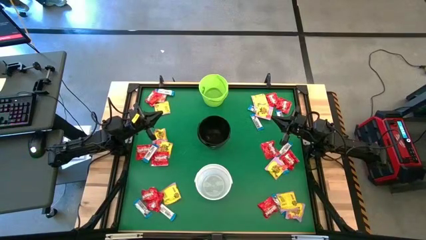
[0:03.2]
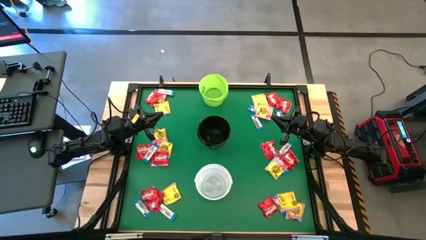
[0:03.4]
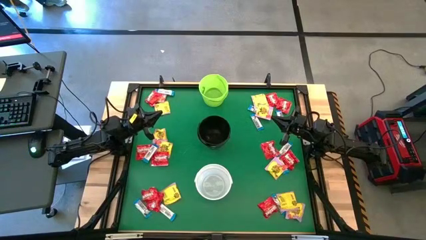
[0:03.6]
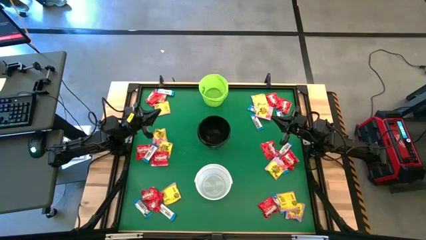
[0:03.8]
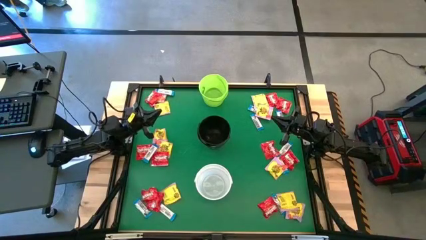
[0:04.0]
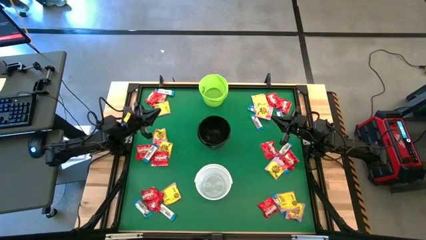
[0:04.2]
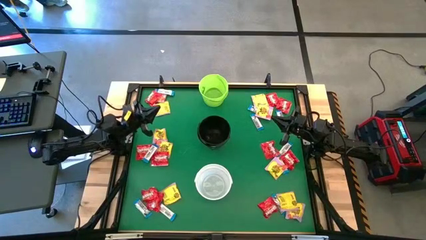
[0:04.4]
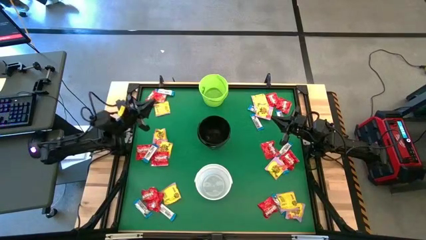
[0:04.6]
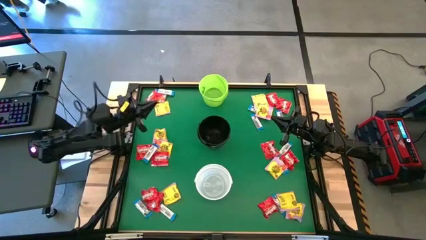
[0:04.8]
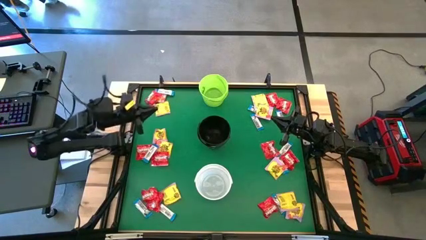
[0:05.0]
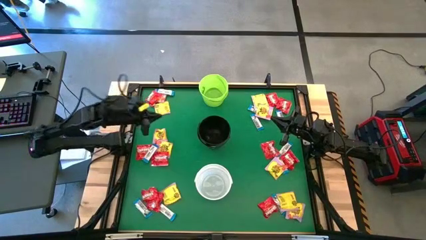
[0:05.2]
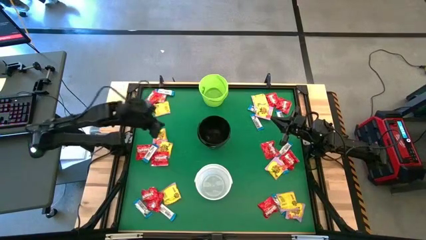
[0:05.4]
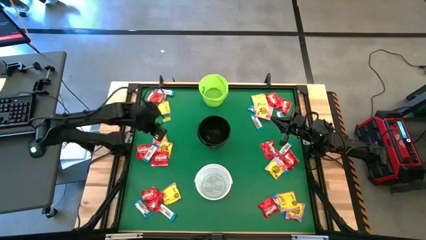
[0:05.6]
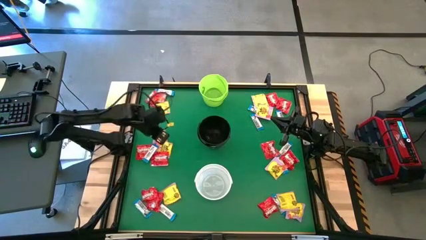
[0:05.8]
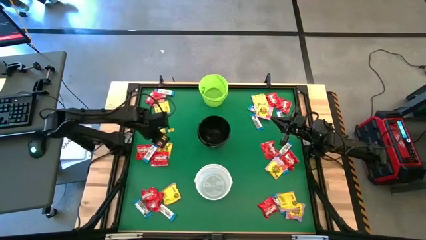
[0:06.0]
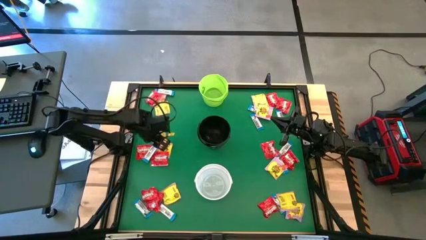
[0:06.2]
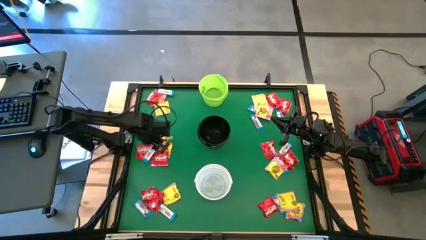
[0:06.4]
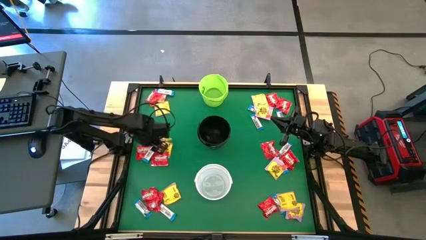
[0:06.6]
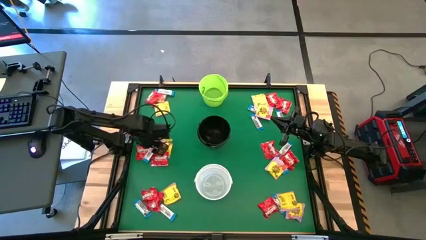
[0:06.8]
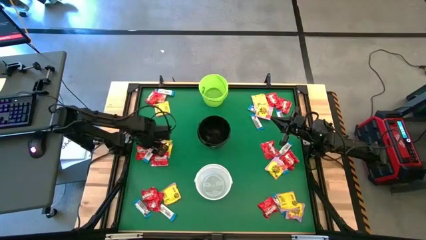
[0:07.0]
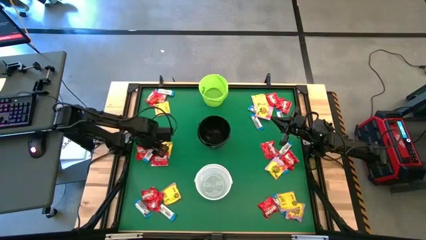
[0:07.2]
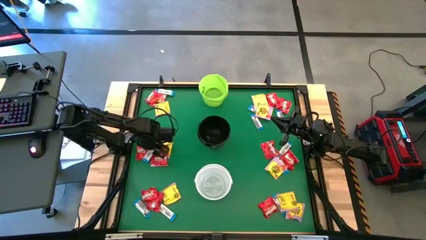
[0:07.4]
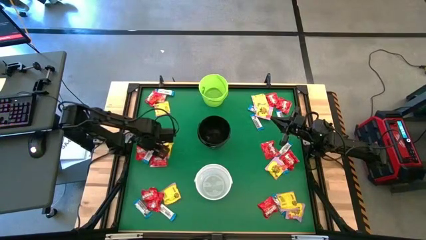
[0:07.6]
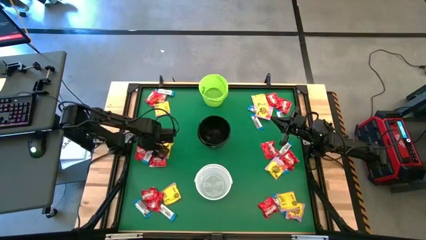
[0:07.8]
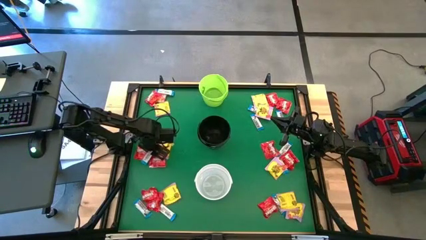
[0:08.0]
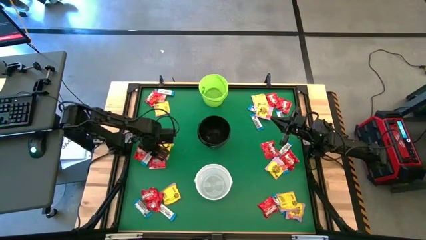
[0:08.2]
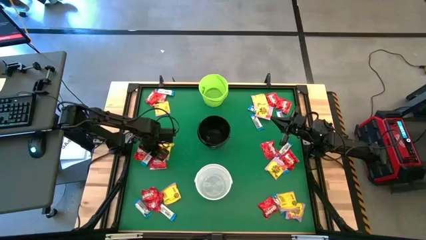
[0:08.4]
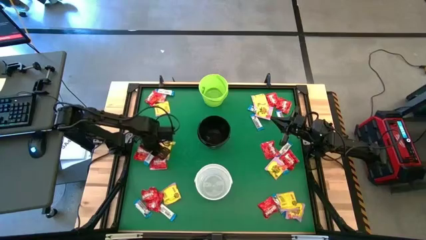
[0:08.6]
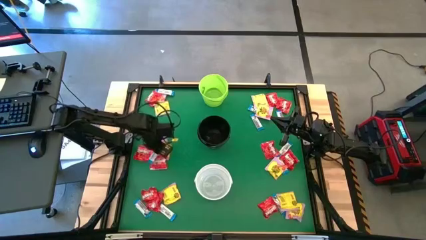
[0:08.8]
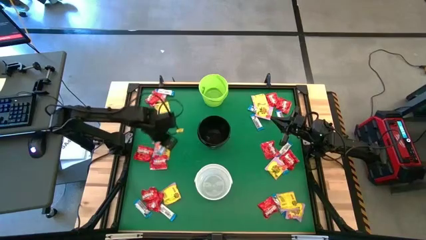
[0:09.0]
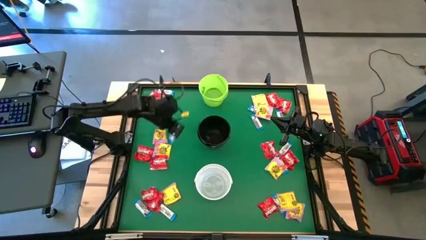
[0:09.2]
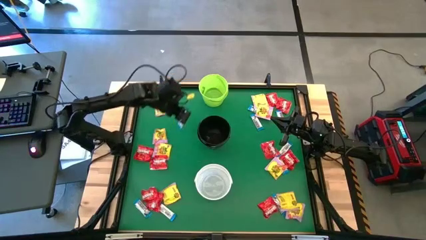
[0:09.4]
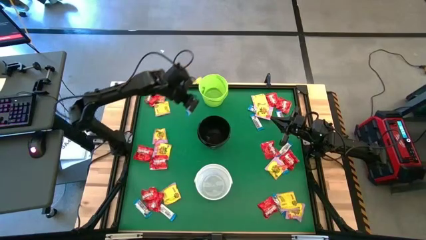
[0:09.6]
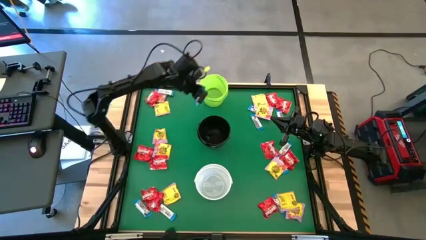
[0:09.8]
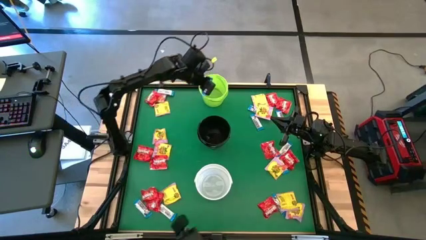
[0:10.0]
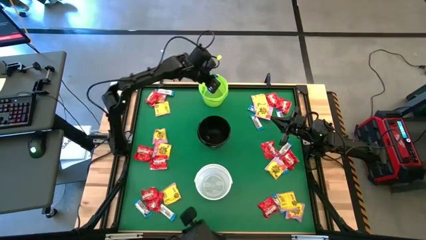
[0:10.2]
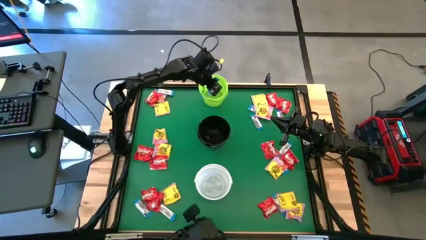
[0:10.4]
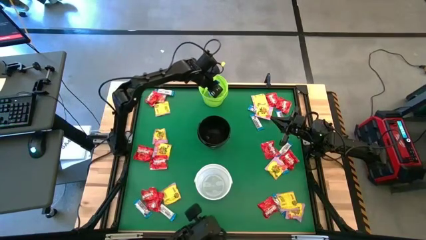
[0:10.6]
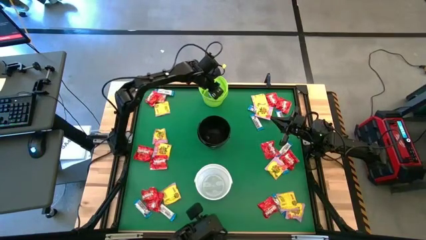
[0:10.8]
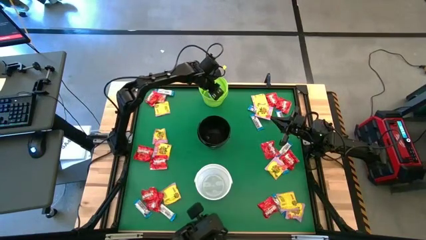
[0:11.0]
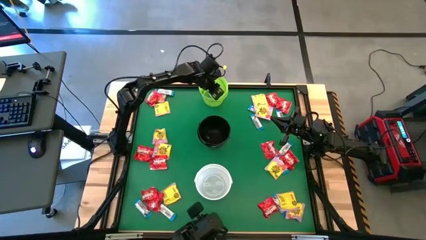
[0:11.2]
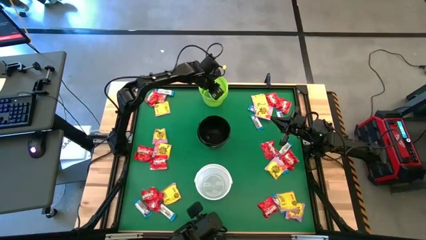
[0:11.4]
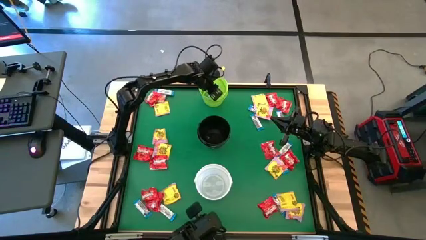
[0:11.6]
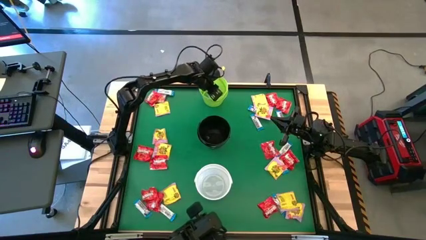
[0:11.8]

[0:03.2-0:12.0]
Task: Sort candy by brand, put in halloween buckets
Put the white chocolate into the green bucket

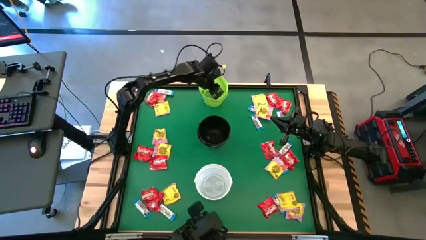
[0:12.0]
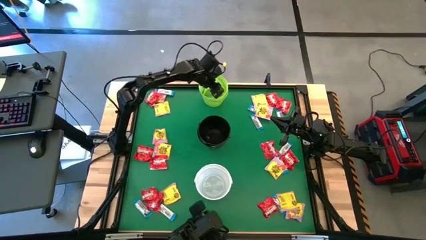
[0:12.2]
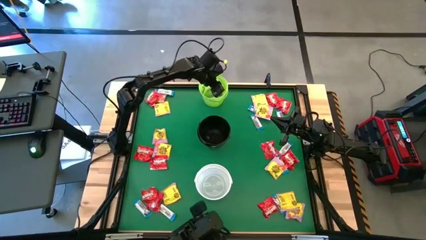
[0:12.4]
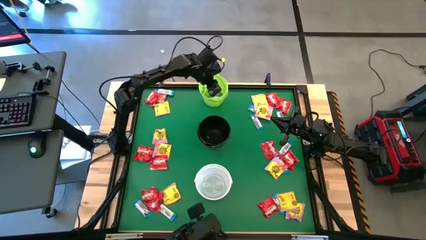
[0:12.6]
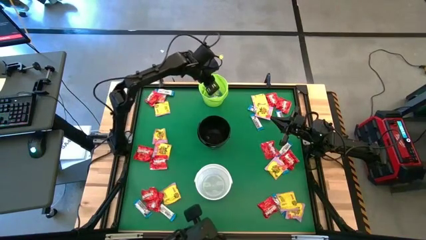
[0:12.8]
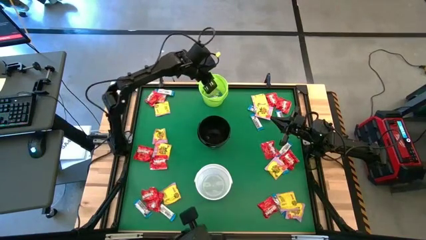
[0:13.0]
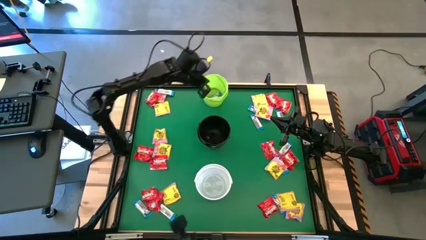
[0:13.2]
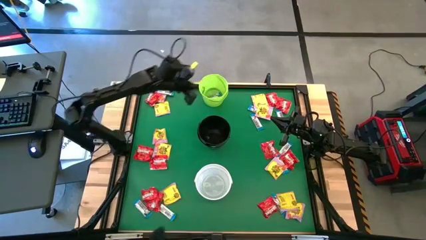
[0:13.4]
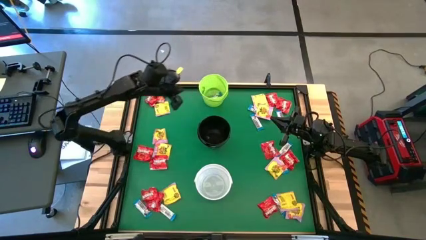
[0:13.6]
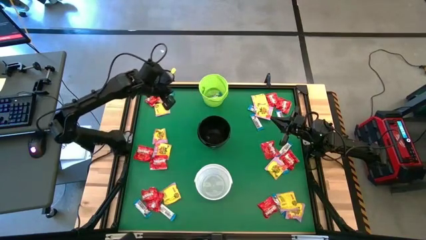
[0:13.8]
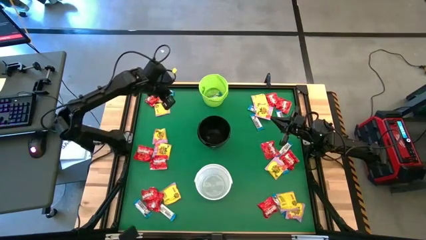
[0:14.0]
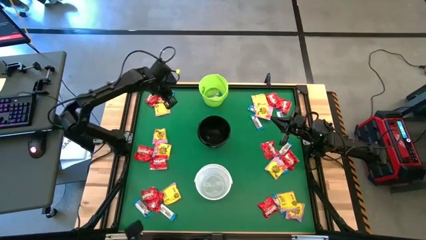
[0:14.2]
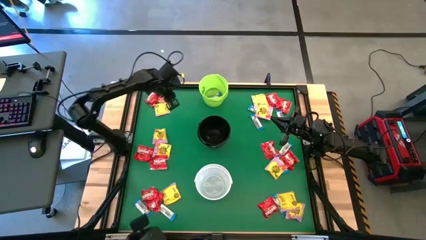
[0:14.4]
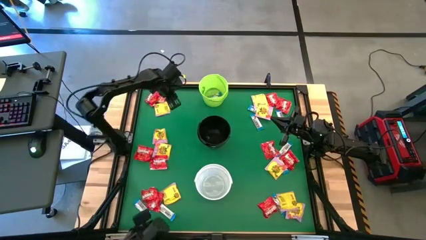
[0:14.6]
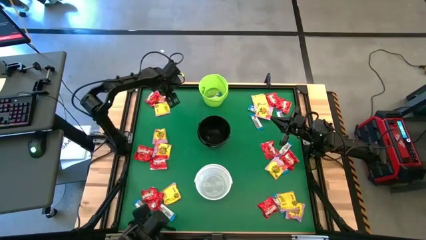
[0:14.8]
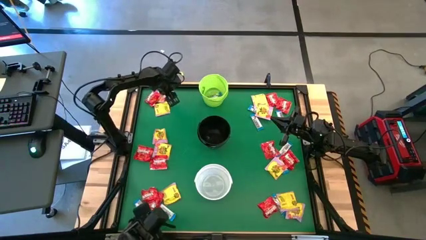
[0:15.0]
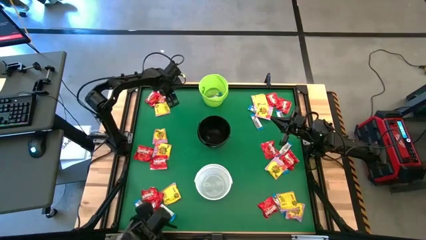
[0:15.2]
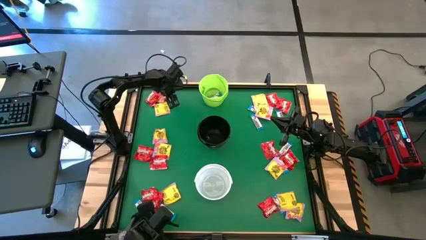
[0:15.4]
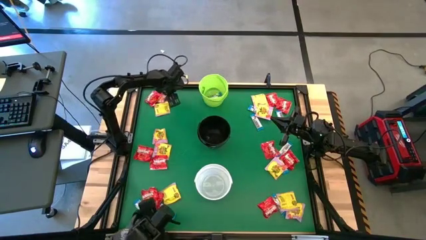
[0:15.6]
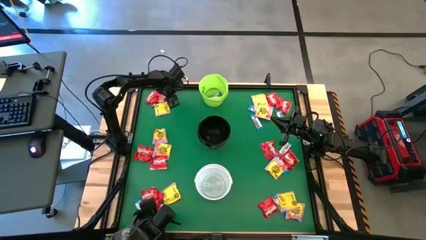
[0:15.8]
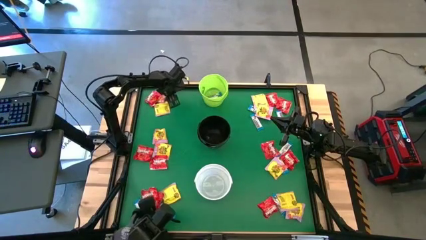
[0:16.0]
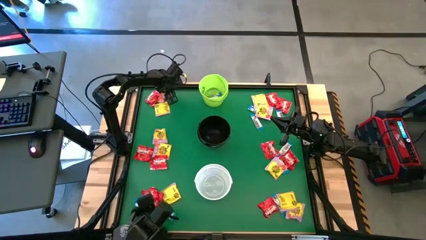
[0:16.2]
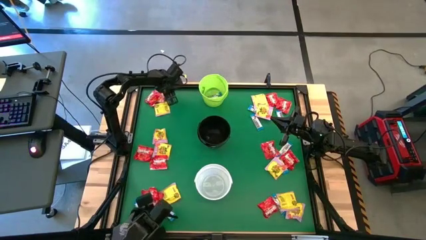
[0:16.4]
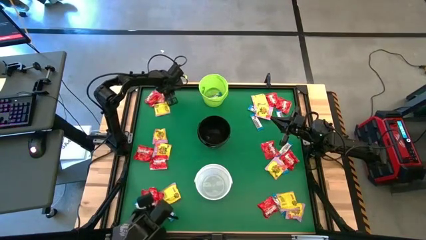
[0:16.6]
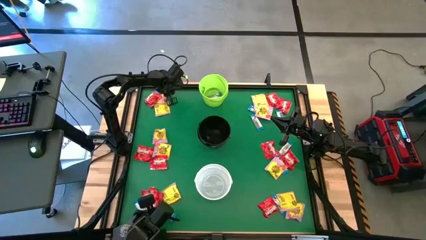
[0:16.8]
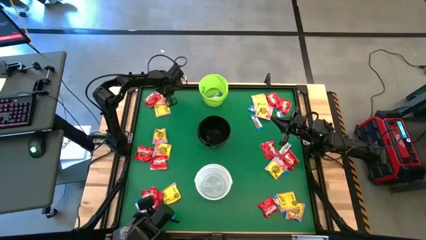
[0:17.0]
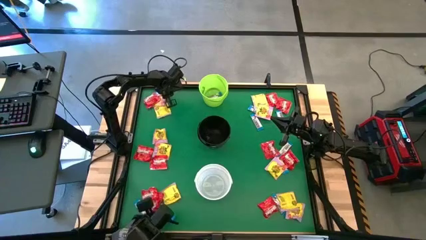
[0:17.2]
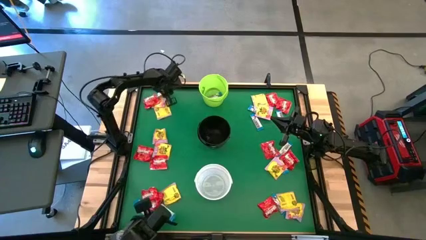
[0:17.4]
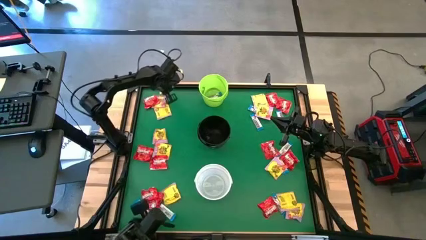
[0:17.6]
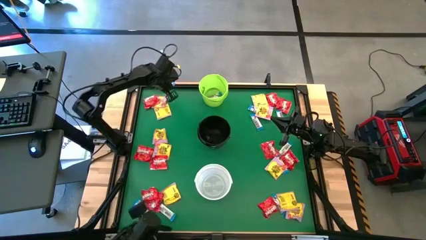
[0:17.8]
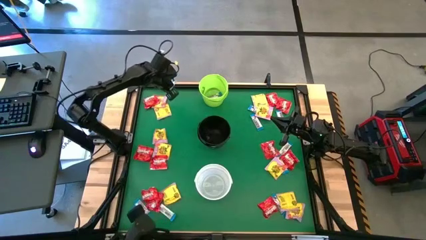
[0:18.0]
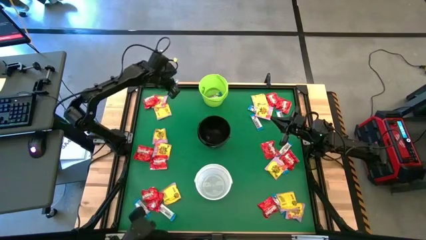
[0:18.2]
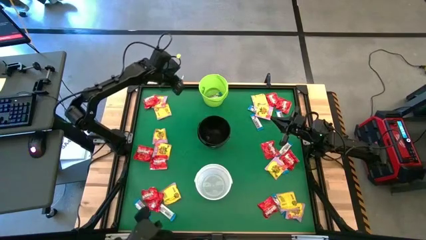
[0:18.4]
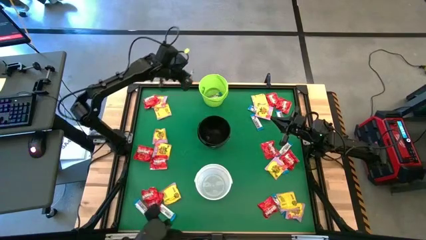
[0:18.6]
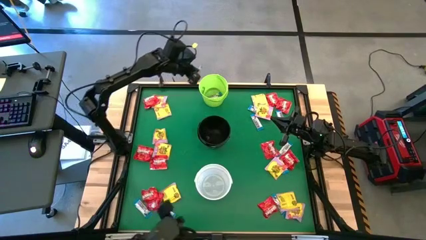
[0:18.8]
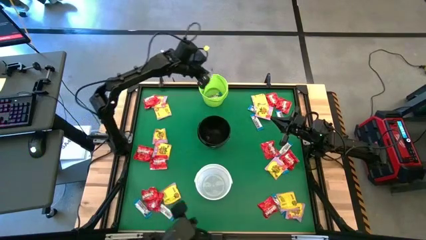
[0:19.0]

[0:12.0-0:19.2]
Put the white chocolate into the green bucket

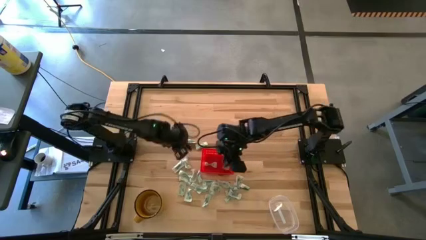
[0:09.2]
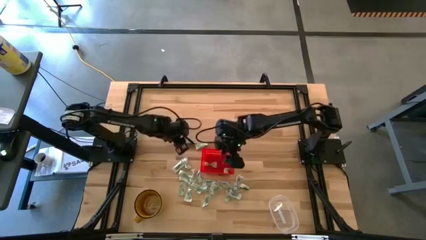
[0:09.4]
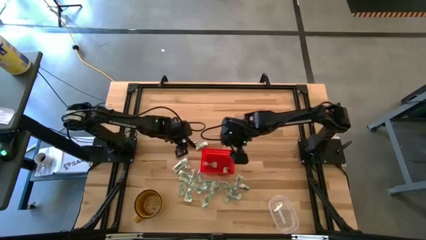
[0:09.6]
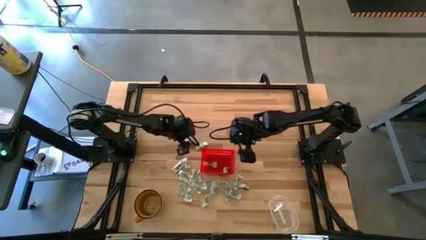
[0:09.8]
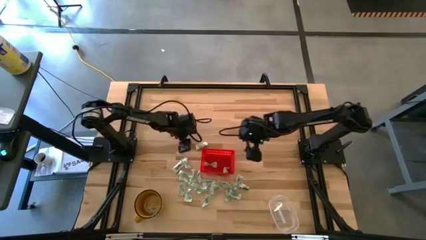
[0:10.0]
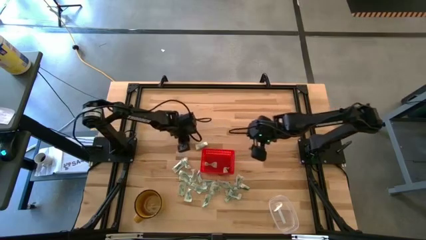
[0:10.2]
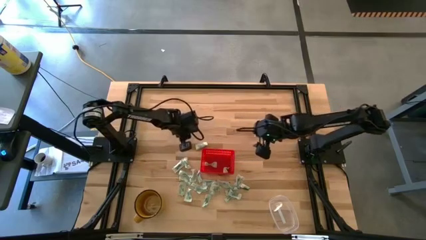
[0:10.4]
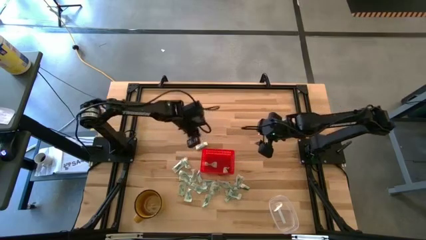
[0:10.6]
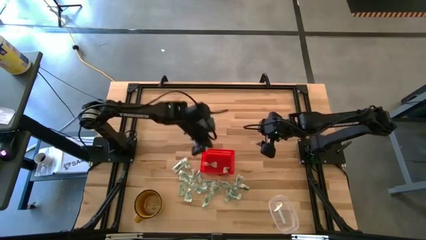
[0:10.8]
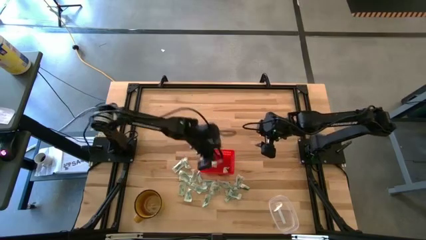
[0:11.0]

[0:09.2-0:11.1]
Task: Pick and place Stevia / Truvia into bins
Put the stevia packet into the orange basket
